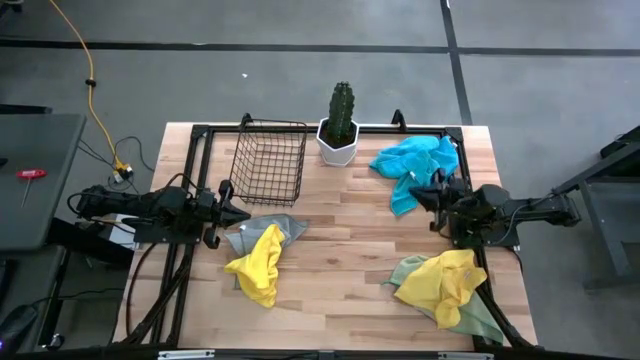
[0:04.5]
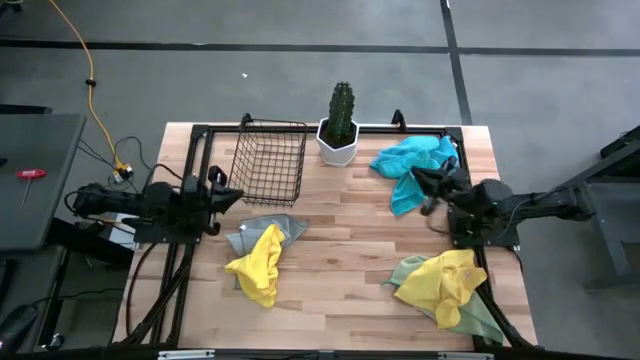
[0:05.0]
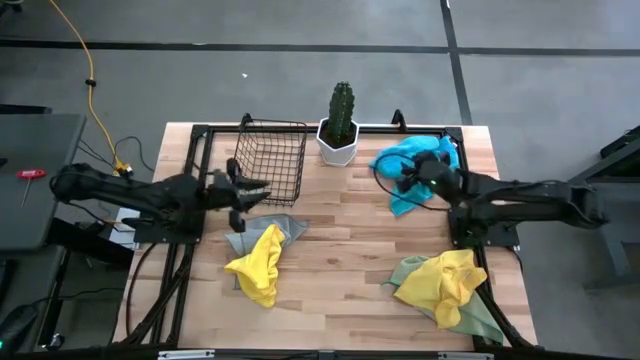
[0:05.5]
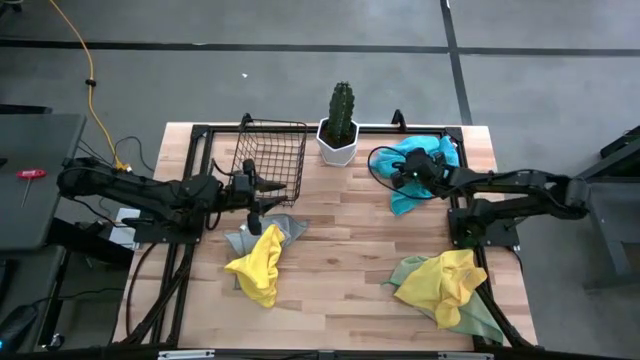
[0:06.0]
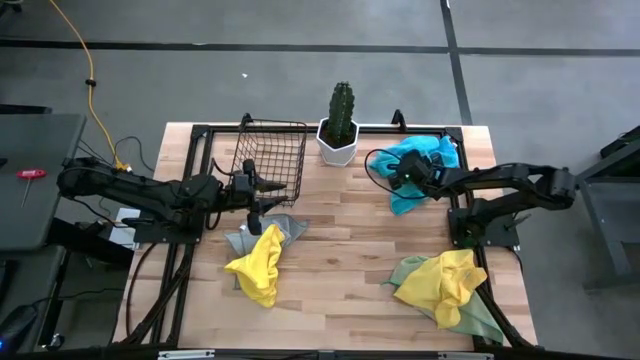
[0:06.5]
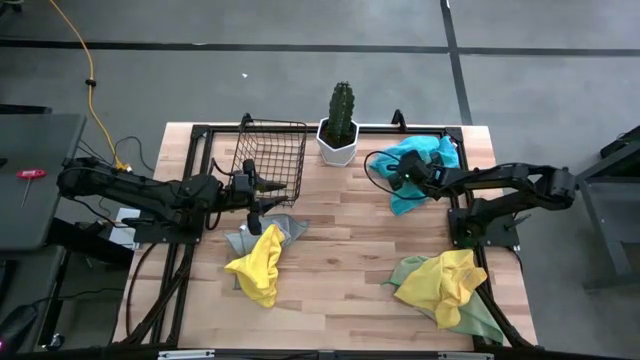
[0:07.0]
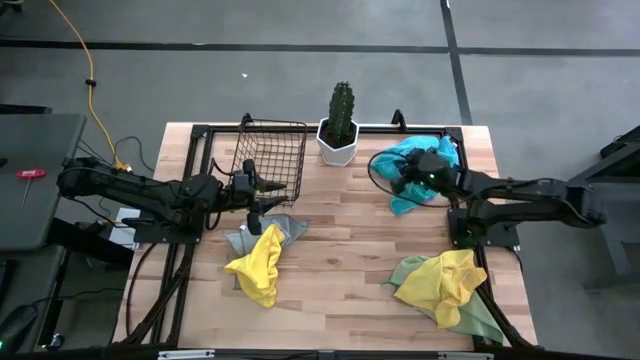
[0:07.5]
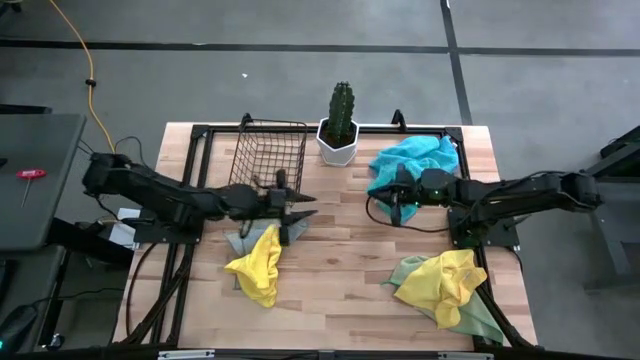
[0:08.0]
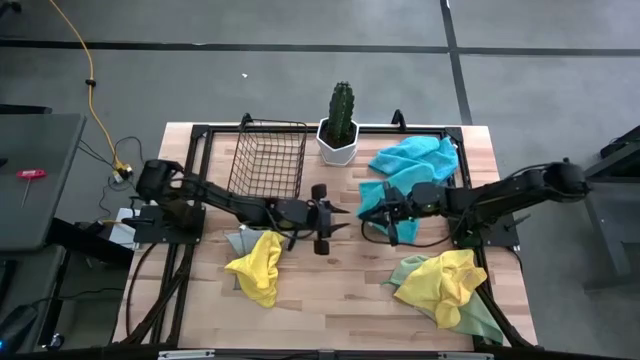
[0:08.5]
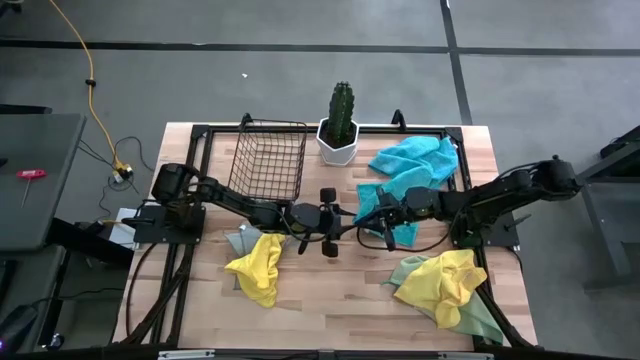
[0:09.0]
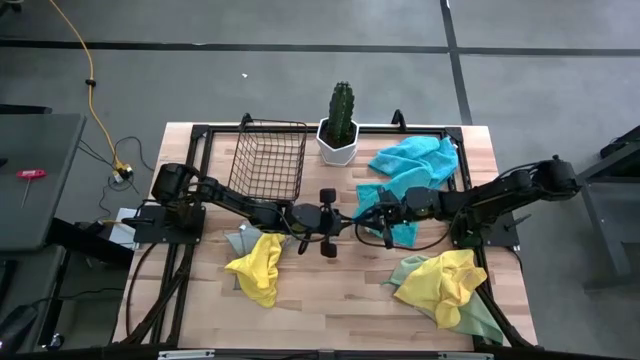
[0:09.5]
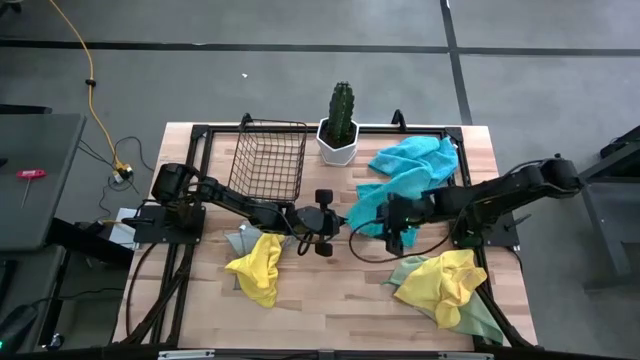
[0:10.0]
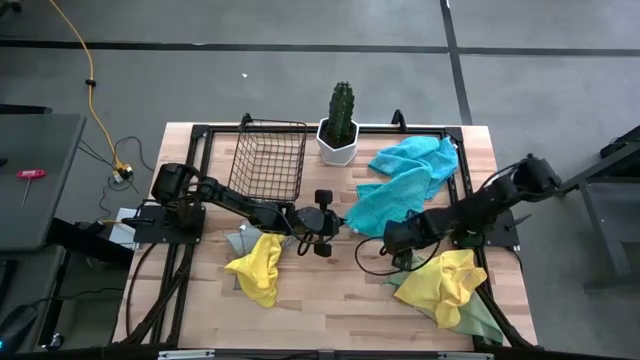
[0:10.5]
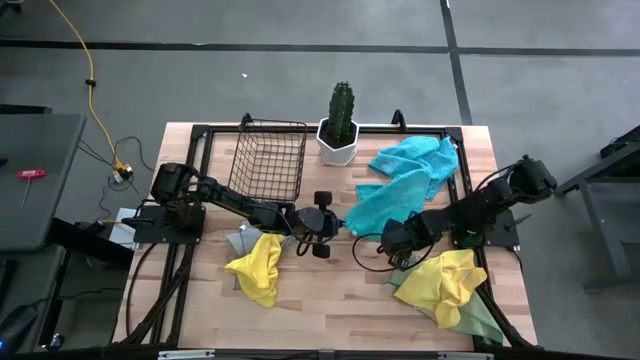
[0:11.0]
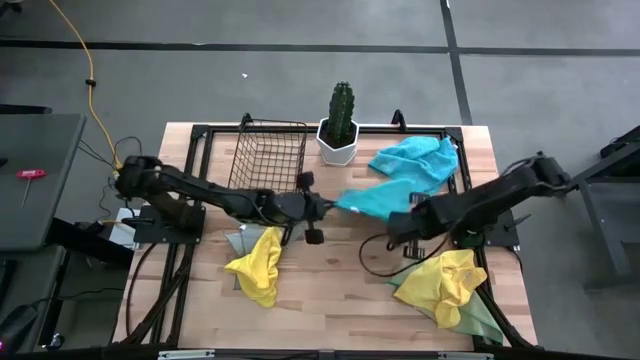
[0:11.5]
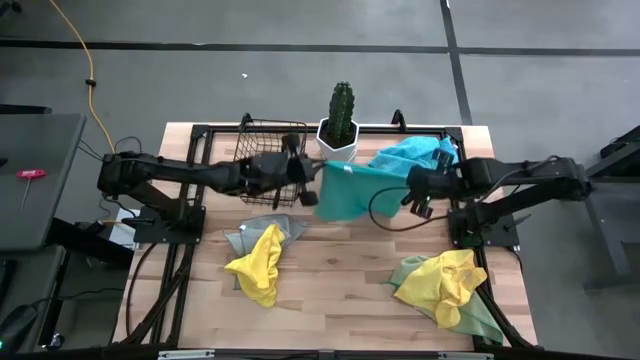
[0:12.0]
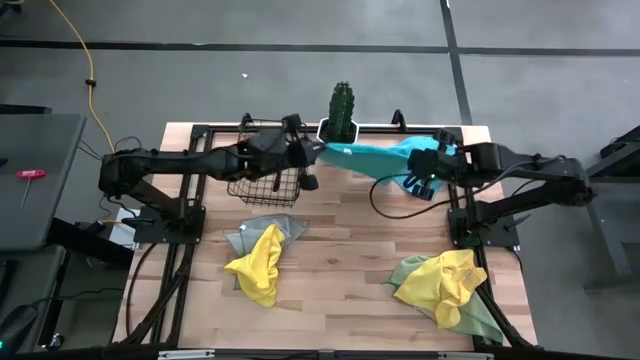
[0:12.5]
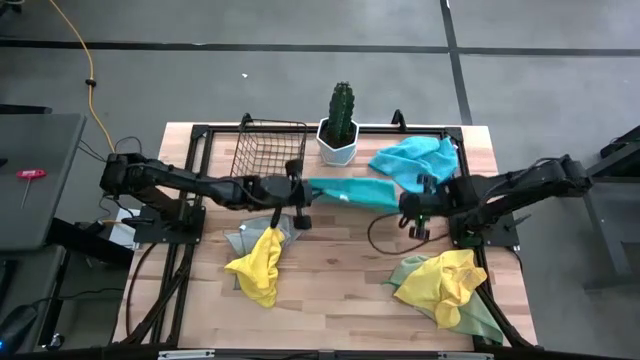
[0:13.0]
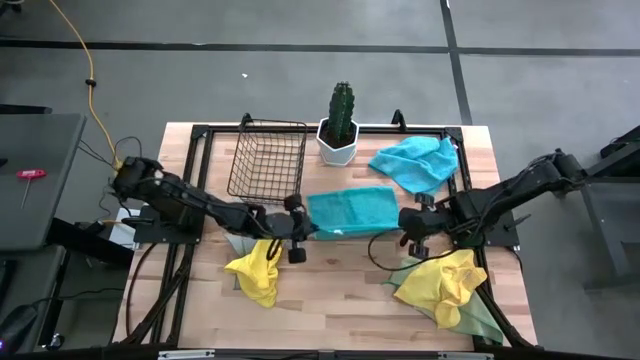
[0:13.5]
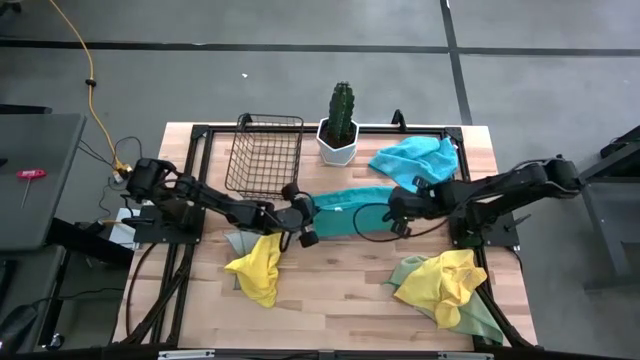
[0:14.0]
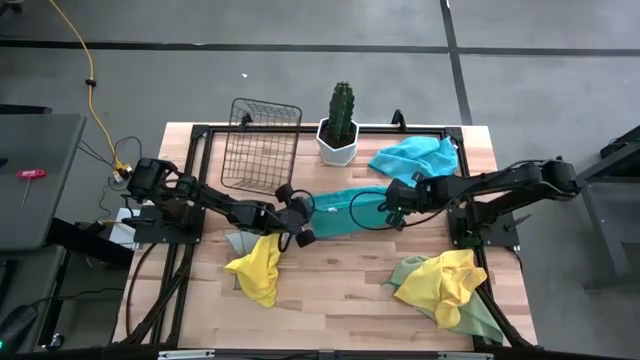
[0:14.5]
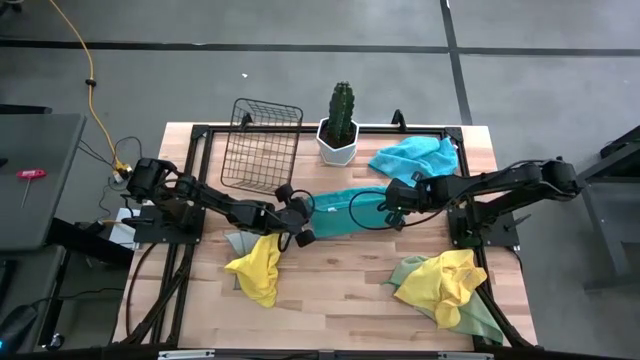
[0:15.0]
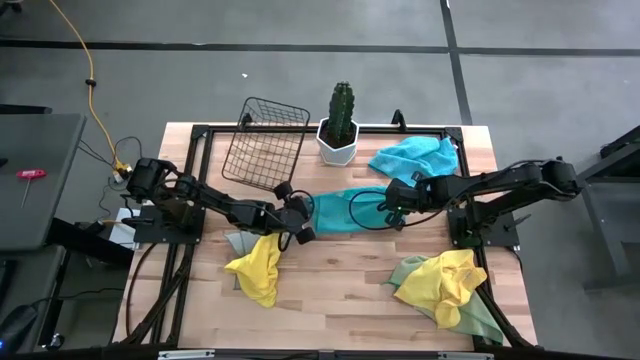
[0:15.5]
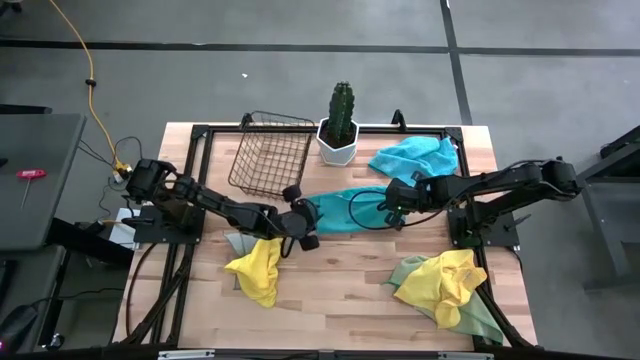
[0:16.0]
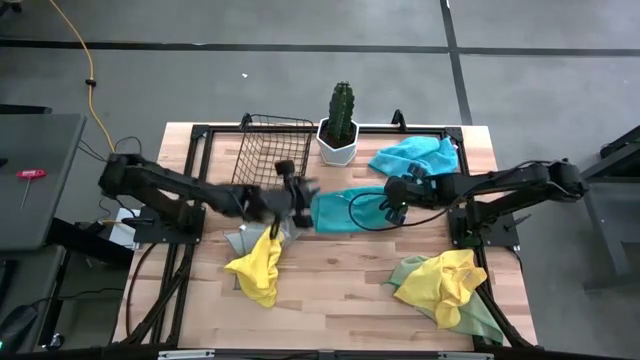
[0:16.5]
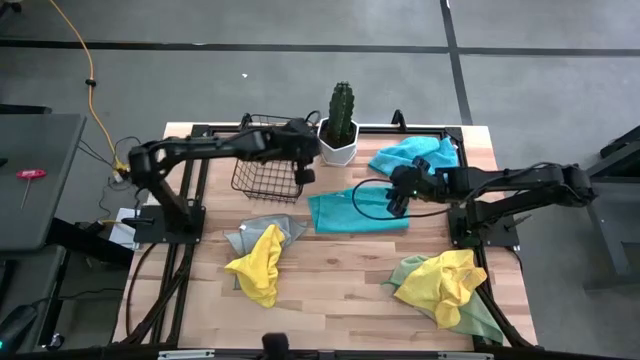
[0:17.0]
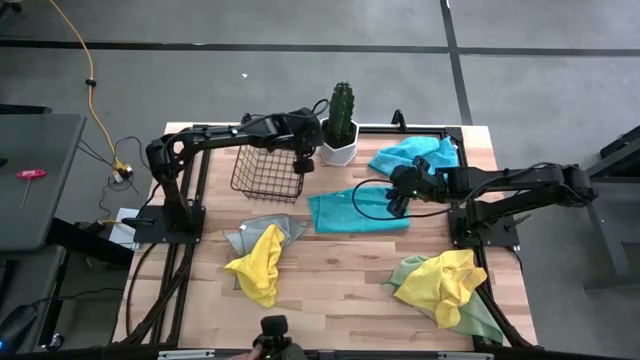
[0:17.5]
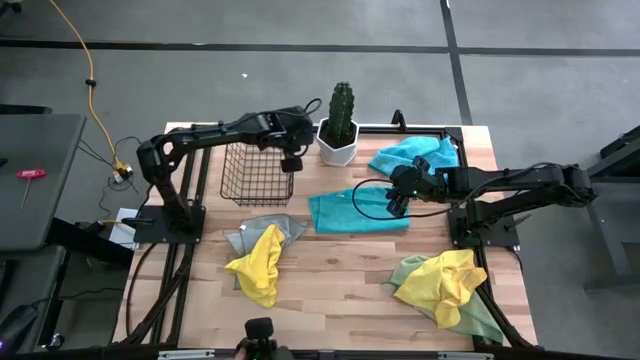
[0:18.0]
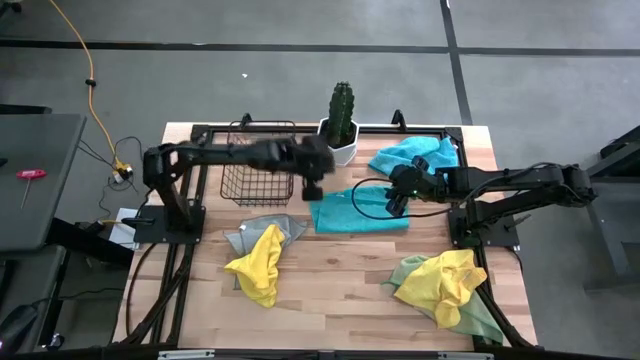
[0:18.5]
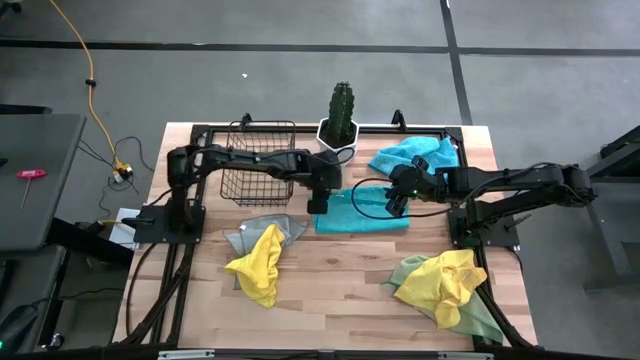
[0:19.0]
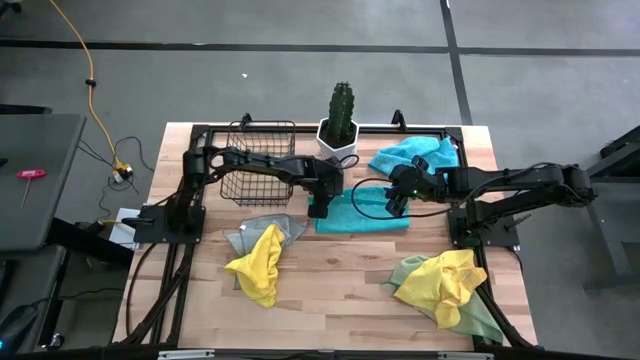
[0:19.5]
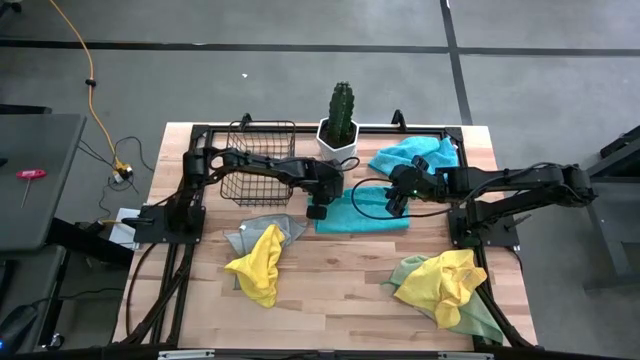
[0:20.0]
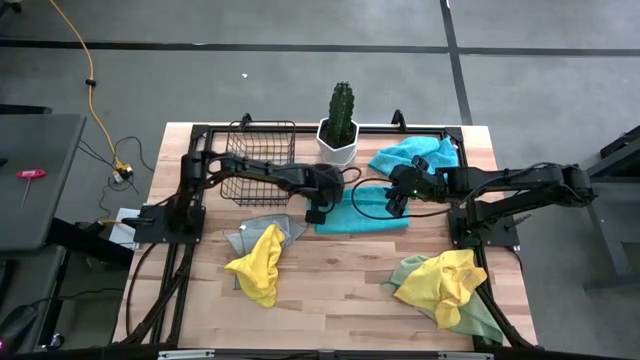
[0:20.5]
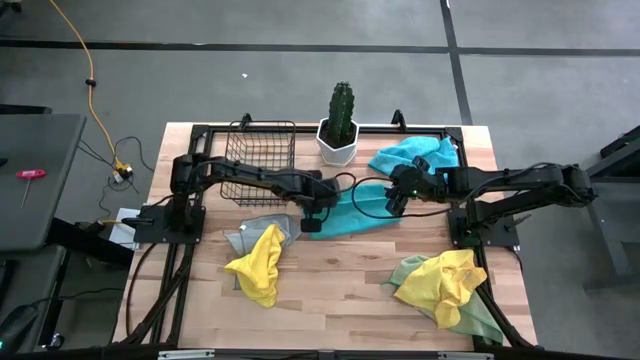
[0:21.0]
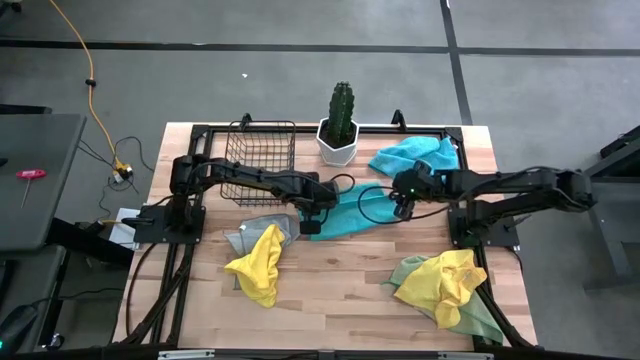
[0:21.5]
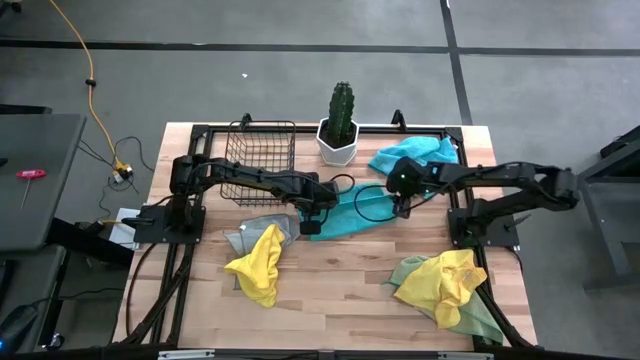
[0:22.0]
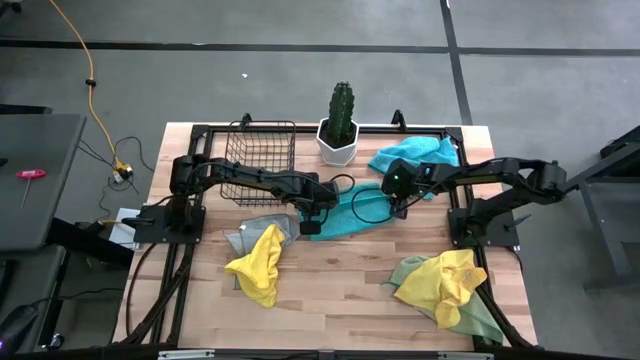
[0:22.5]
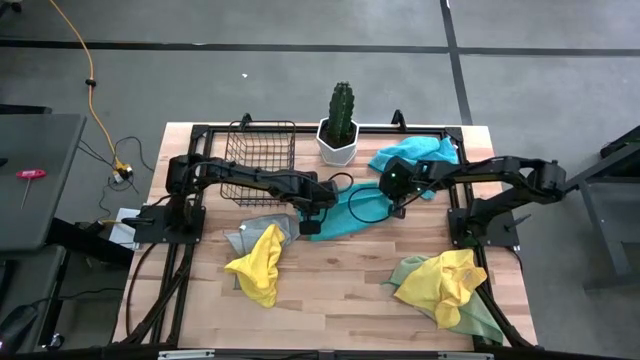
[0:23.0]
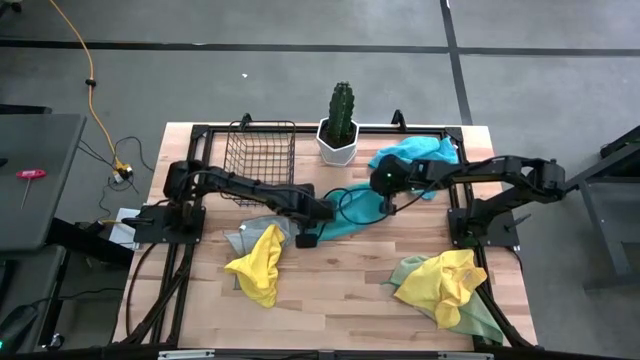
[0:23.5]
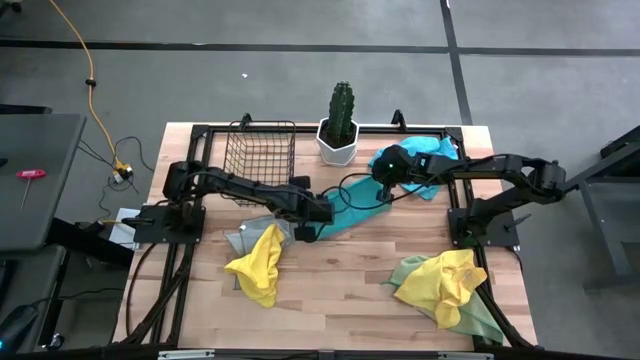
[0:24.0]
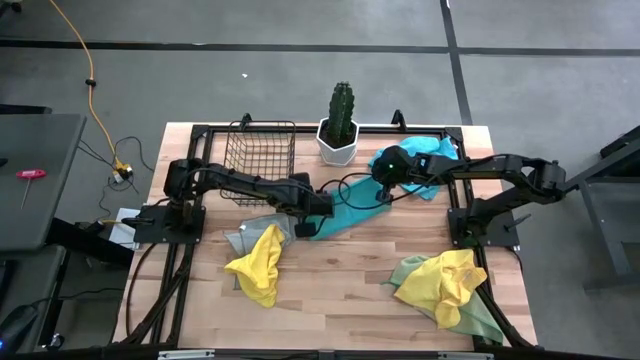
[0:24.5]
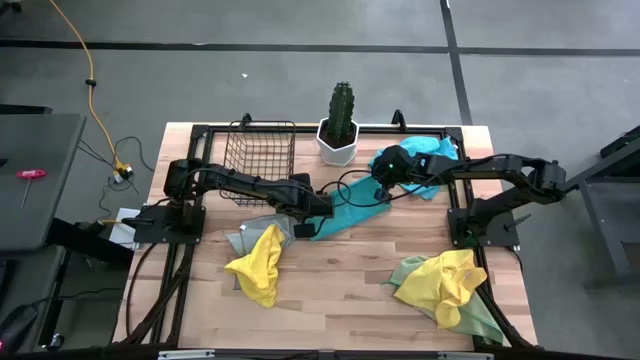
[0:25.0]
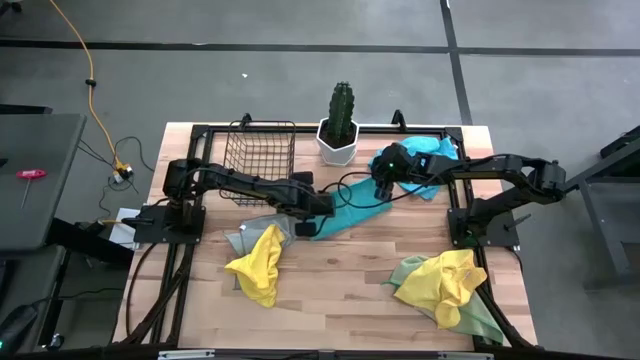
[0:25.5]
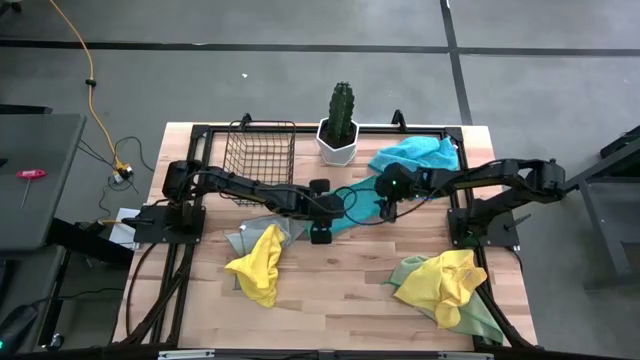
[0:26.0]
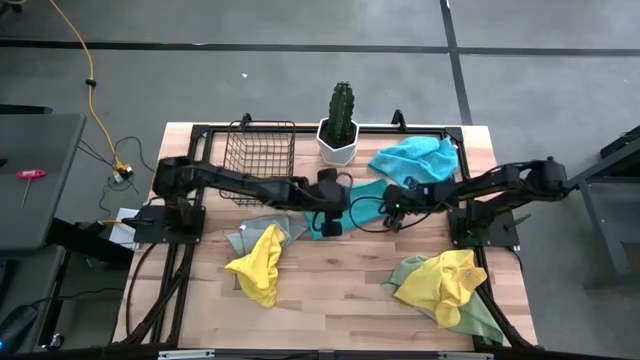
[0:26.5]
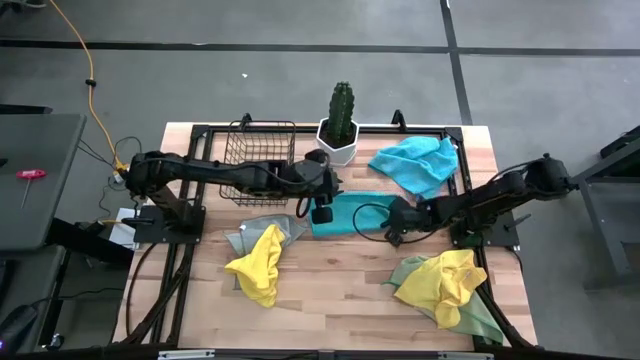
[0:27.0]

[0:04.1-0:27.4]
Task: Fold microfiber towels
Fold the top blue microfiber towel on the table
